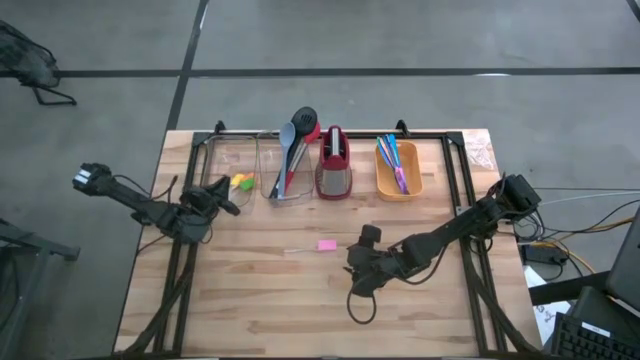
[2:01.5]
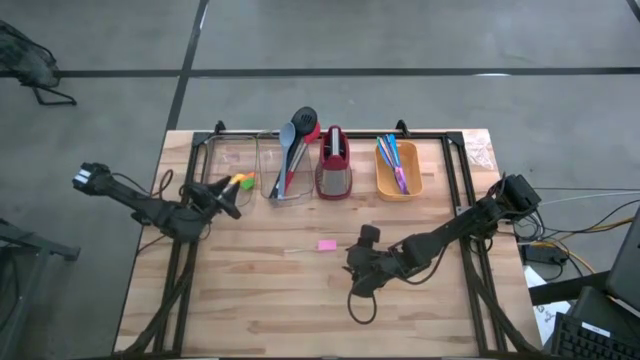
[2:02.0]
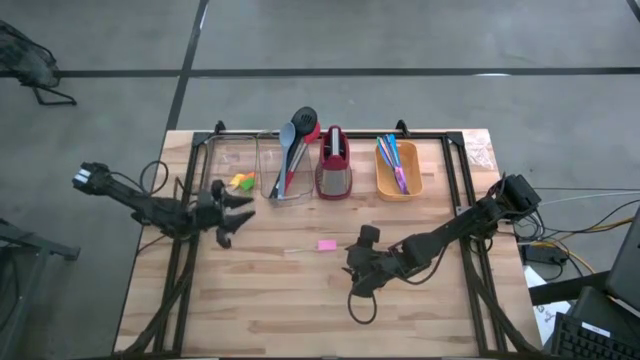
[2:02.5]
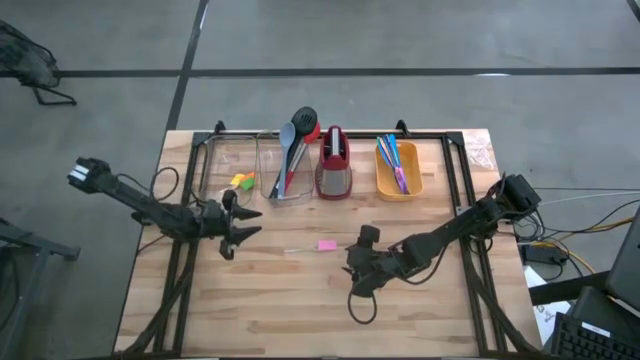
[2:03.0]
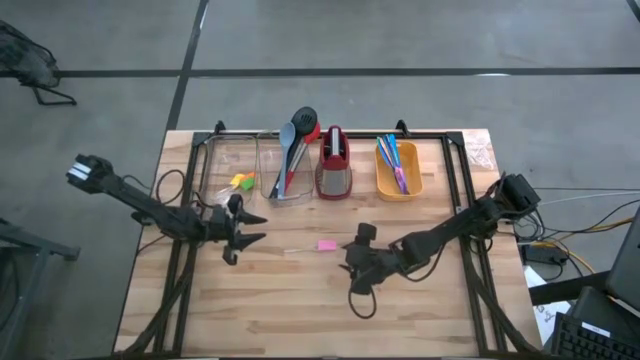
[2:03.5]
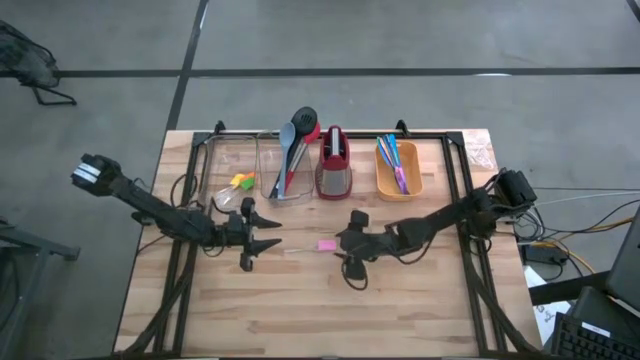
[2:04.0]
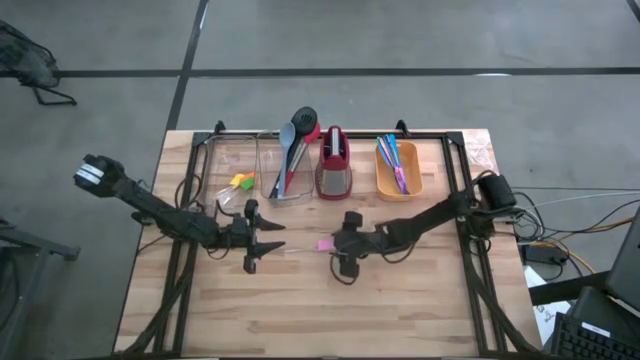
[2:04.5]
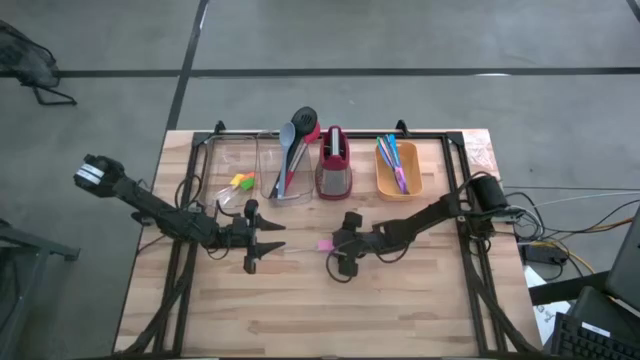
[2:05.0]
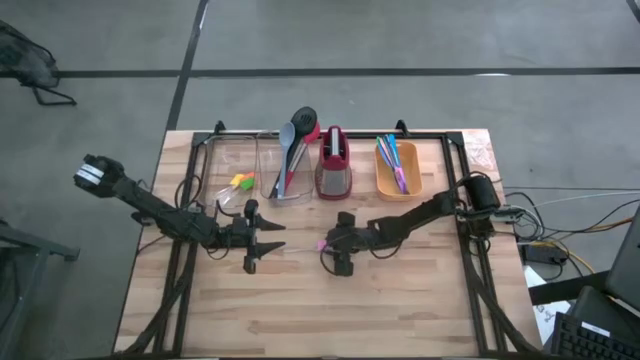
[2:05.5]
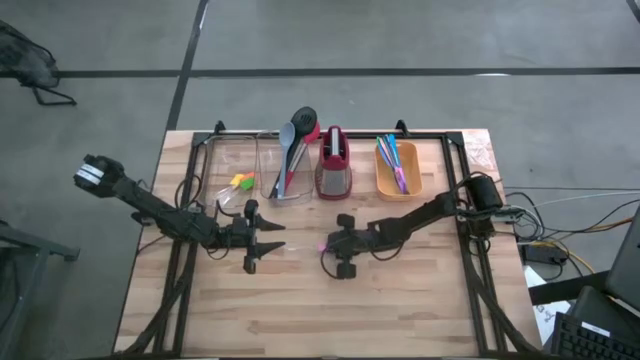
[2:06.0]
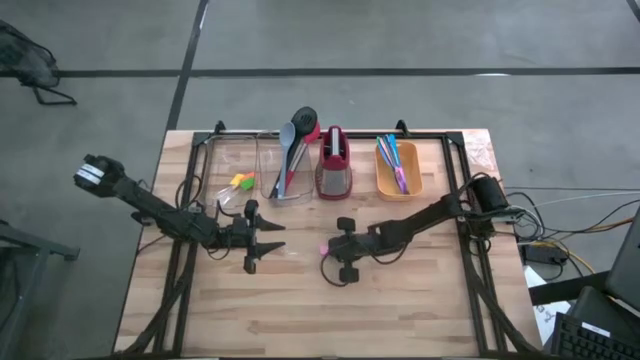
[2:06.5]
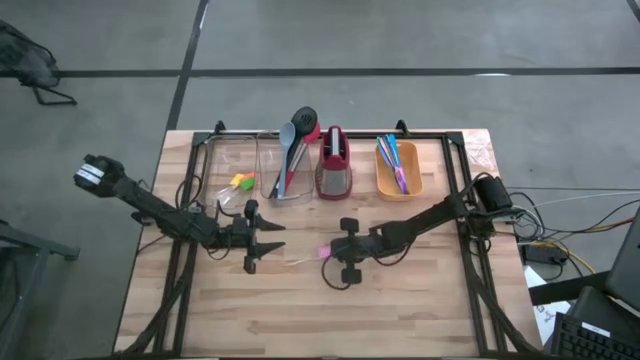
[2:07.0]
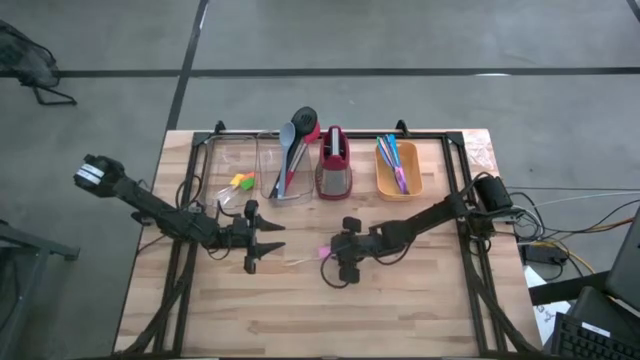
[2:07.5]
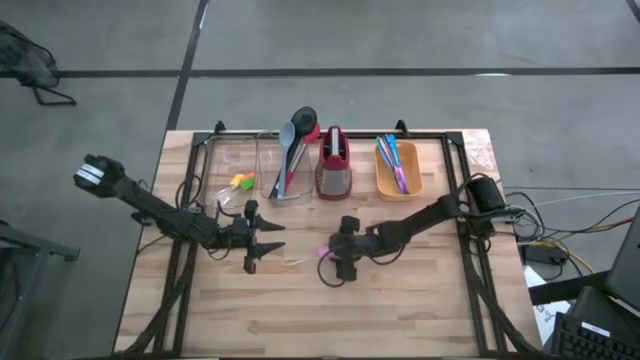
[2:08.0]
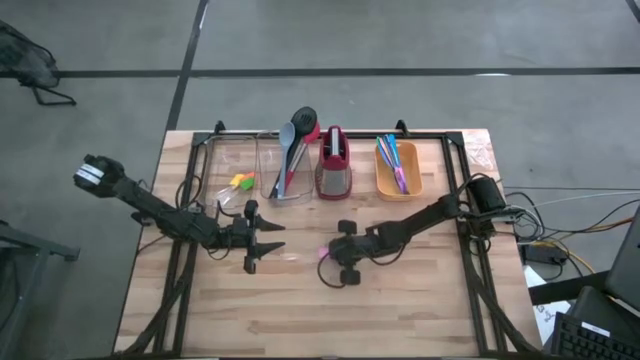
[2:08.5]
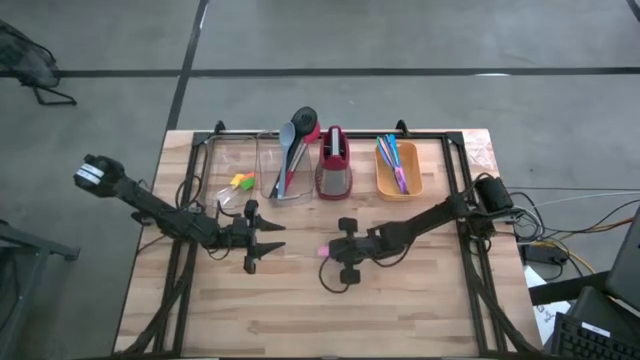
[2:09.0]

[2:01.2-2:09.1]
Task: Pick & Place Kitchen Items
Put the pink spatula into the left transparent bin

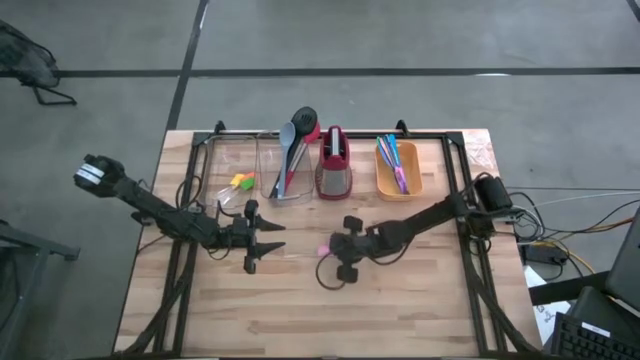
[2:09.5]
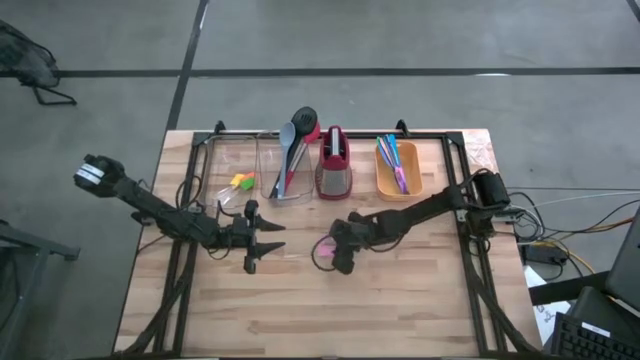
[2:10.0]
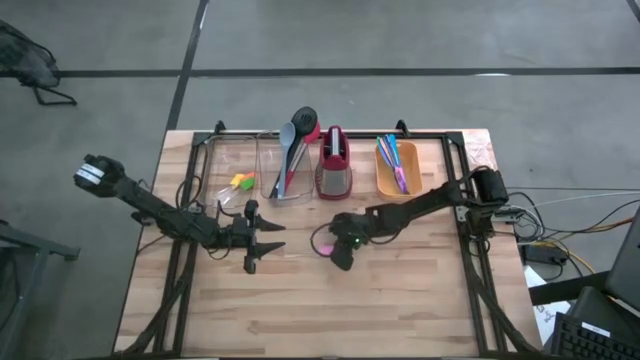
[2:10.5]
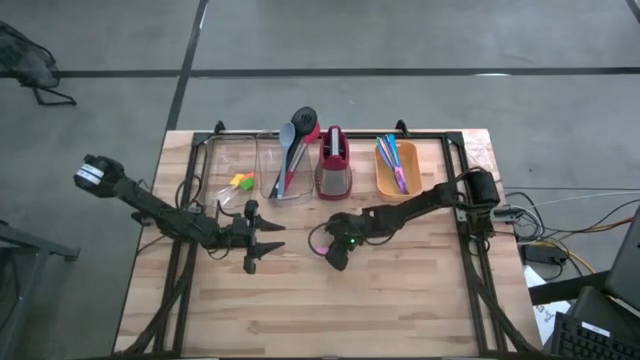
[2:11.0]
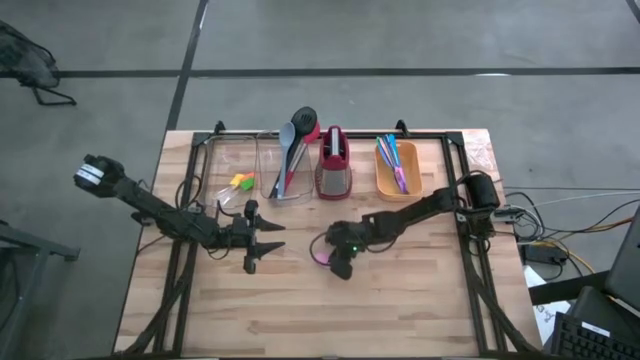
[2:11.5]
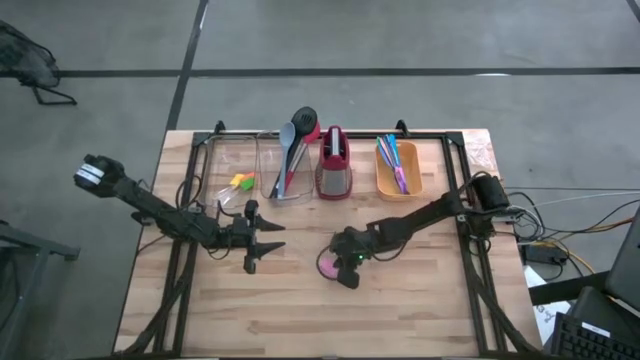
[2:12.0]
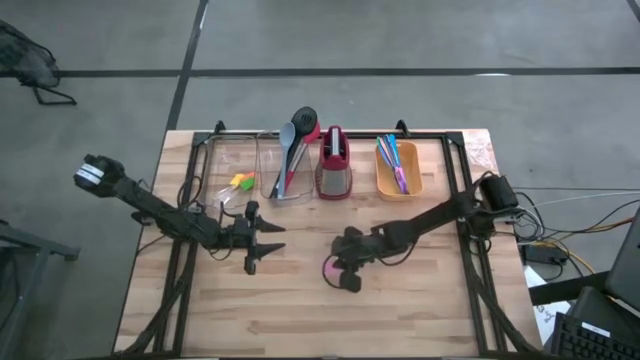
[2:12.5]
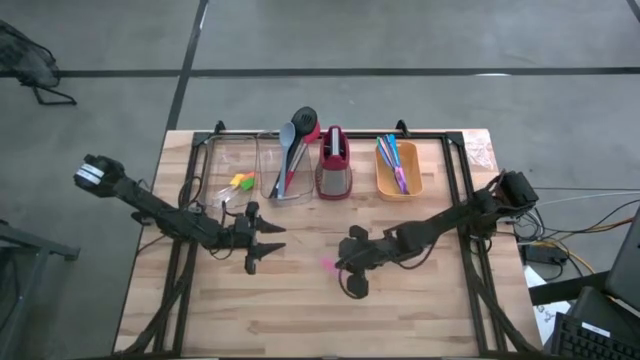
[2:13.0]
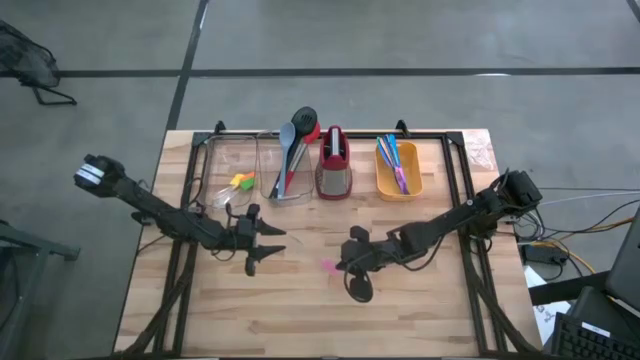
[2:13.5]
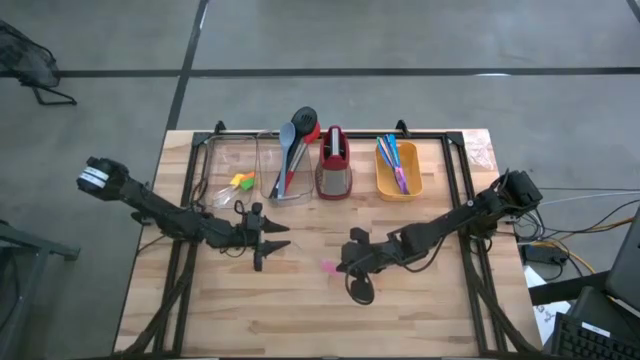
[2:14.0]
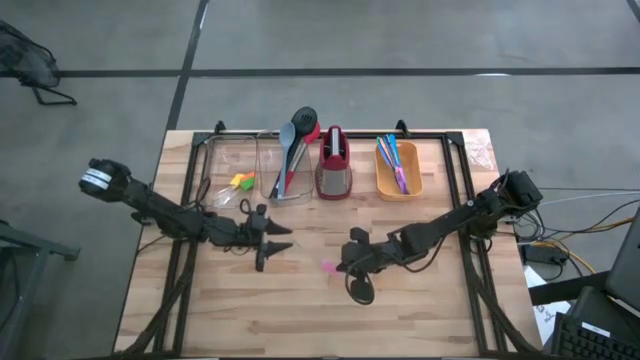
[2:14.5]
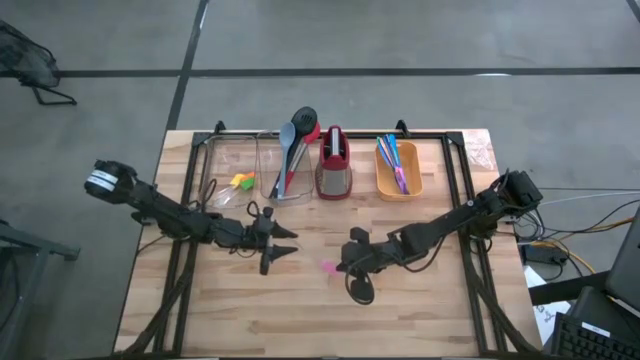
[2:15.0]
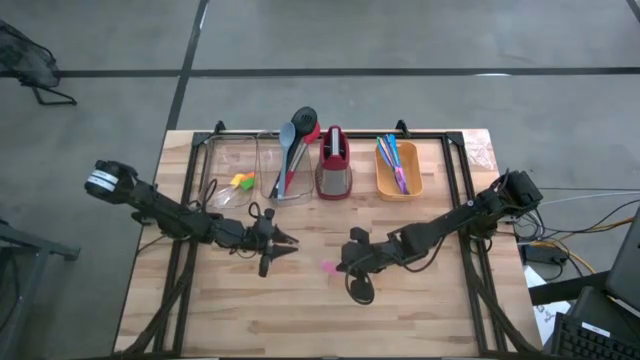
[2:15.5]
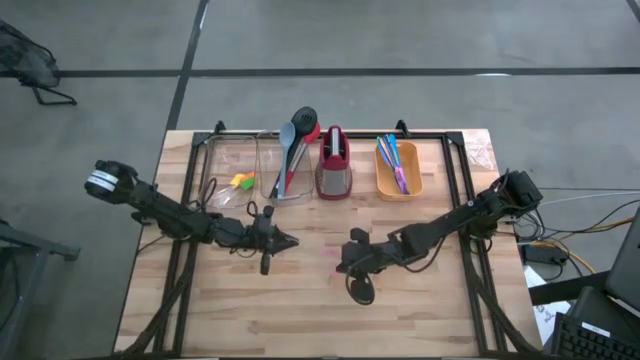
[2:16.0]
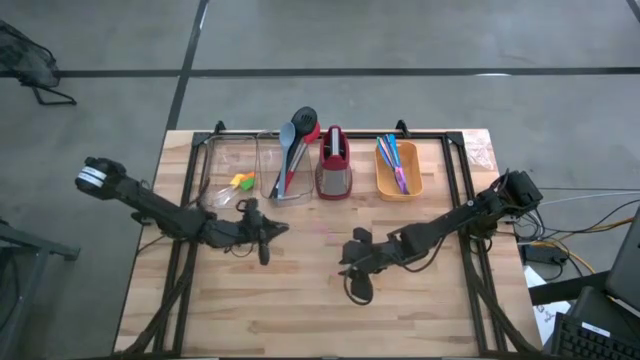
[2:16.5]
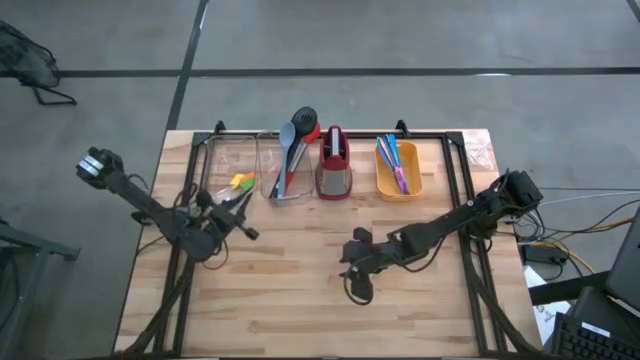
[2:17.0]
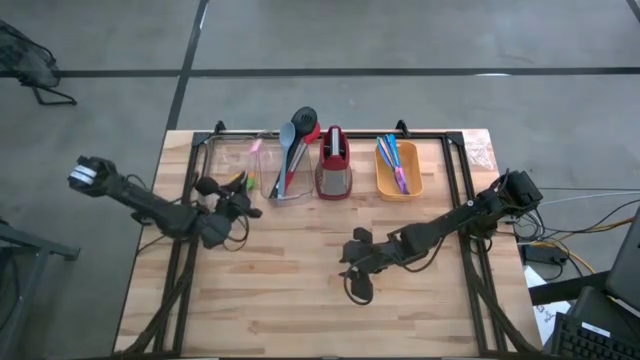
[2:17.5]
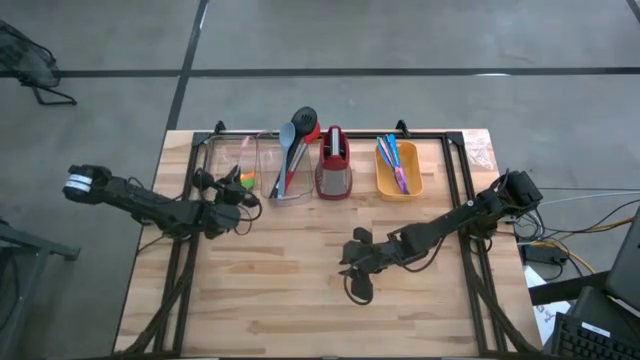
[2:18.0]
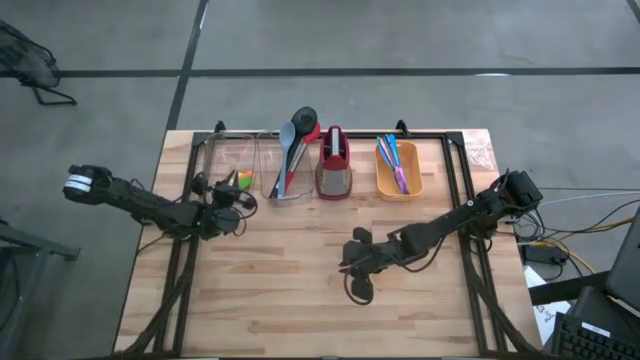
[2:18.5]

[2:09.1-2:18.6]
Put the pink spatula into the left transparent bin

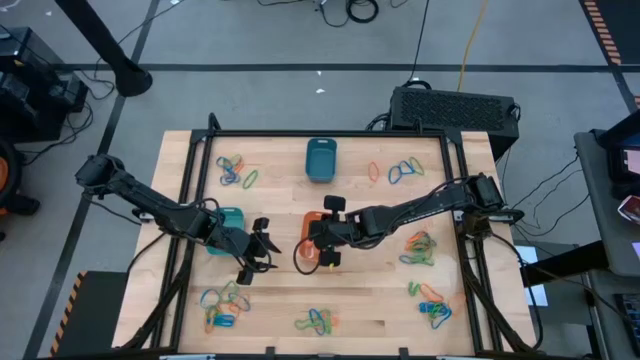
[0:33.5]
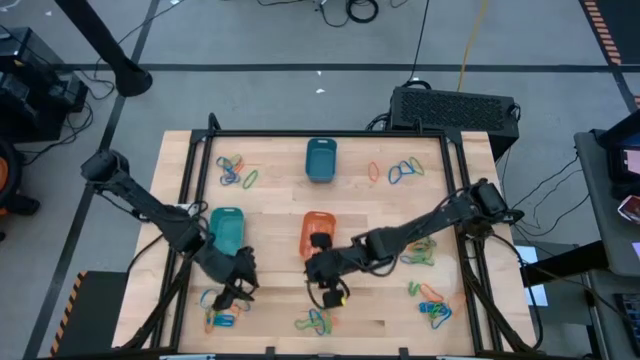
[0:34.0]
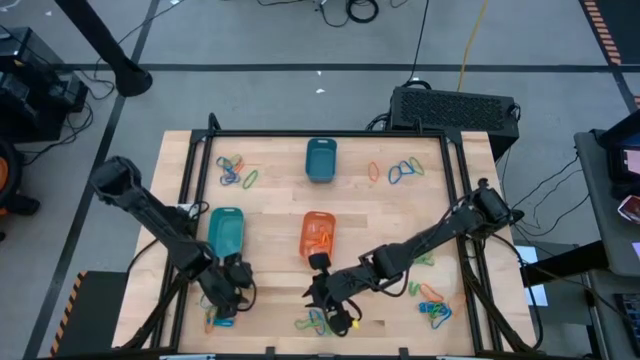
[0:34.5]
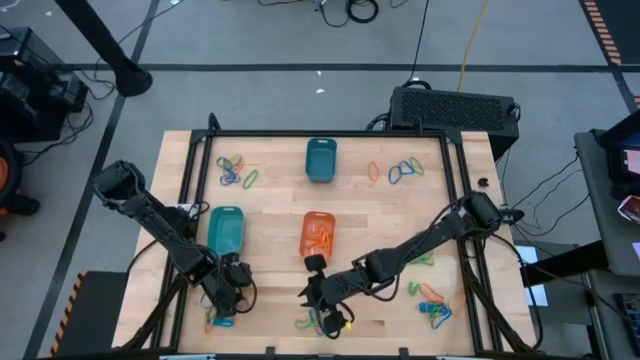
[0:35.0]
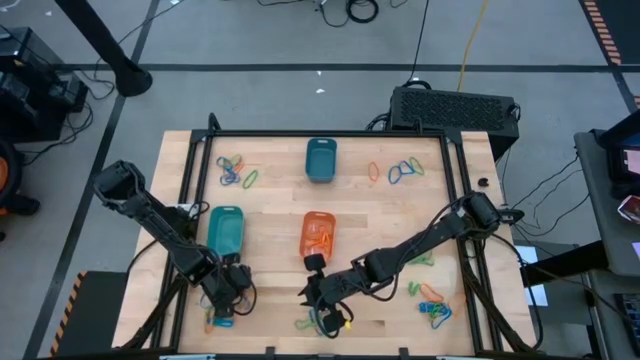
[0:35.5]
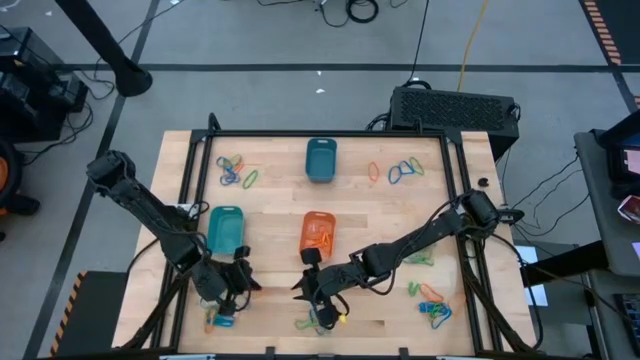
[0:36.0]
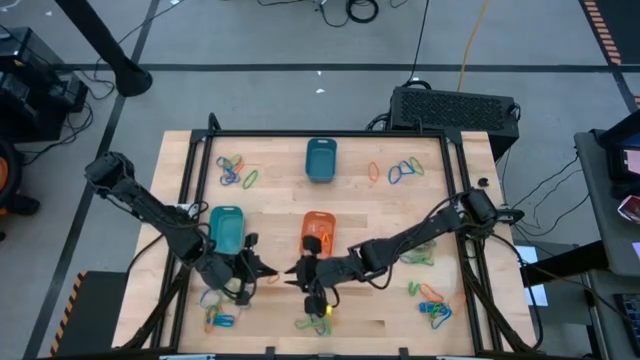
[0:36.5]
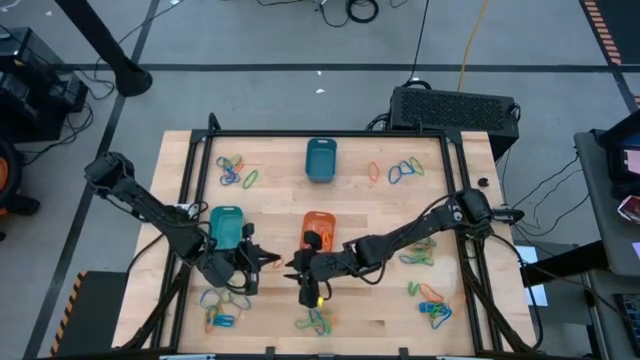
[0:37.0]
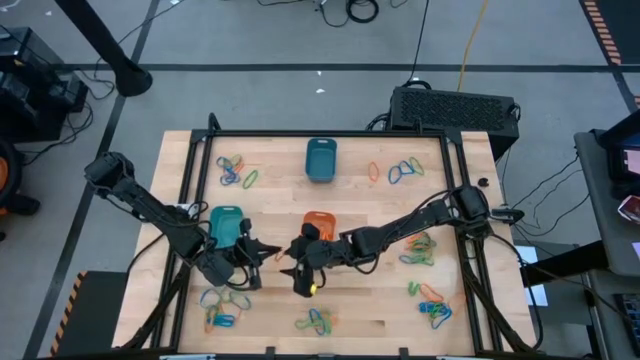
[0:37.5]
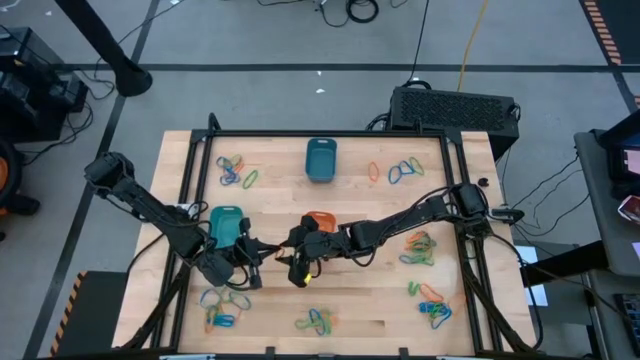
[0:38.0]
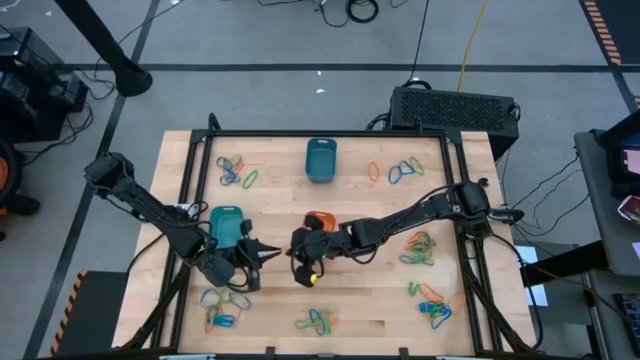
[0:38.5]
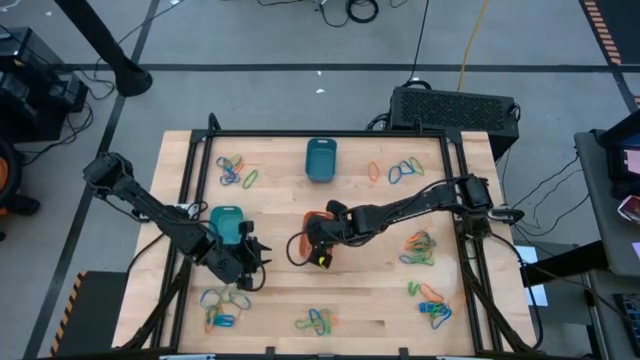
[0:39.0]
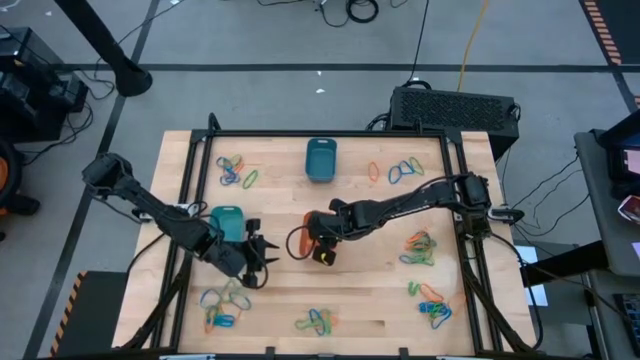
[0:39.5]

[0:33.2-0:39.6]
Task: Sort rubber bands into baskets
Put the orange rubber band into the orange bin
